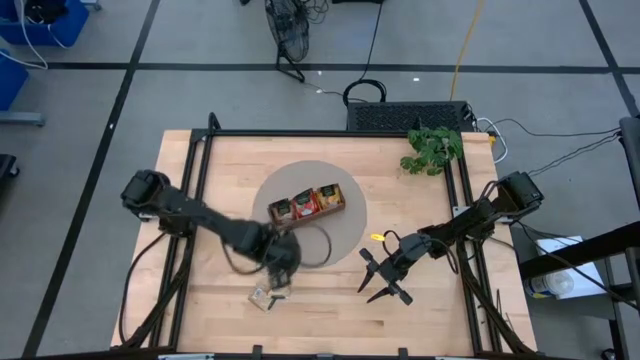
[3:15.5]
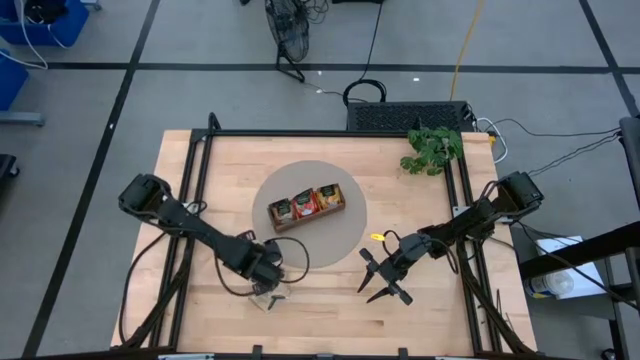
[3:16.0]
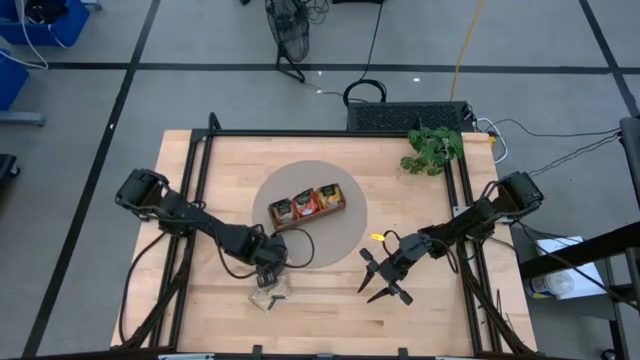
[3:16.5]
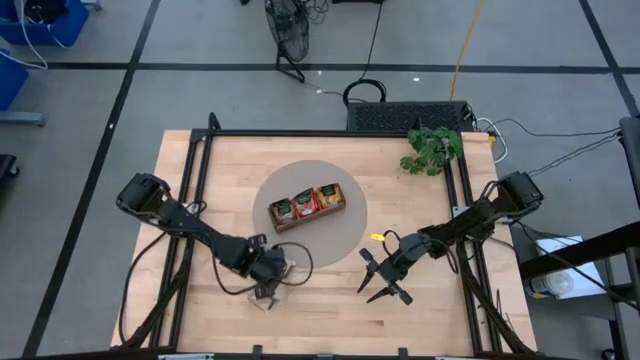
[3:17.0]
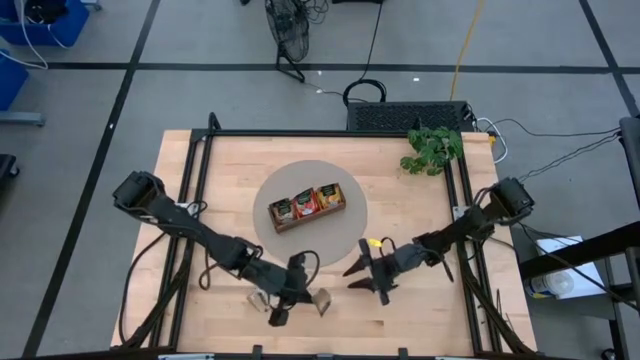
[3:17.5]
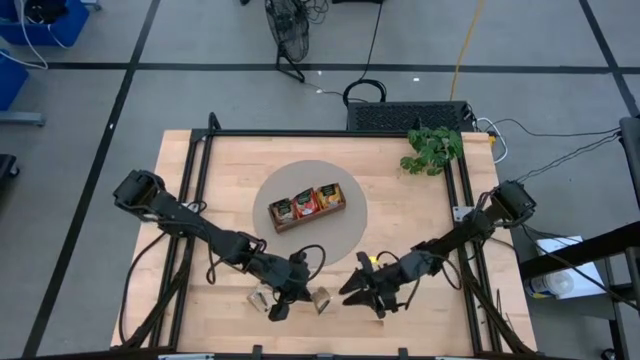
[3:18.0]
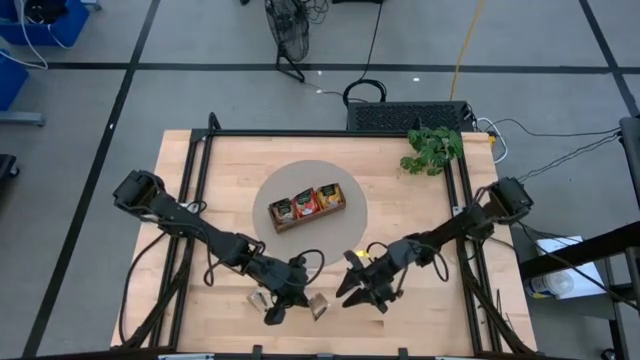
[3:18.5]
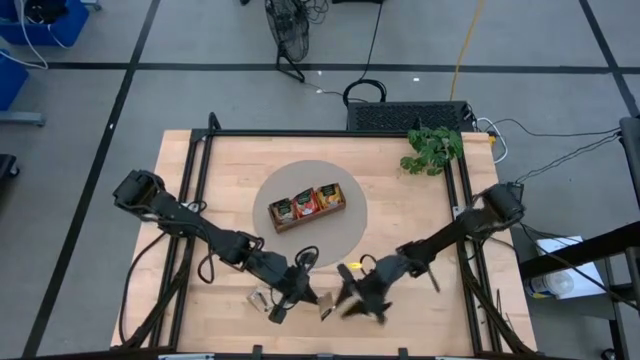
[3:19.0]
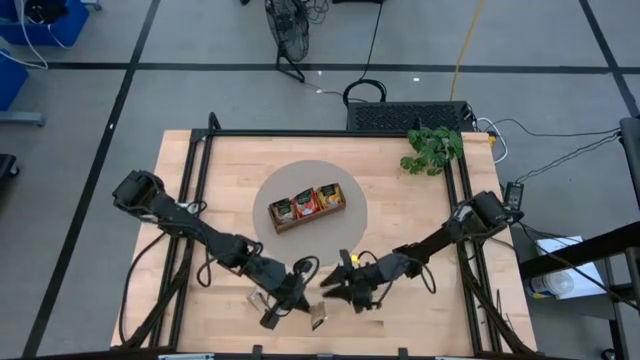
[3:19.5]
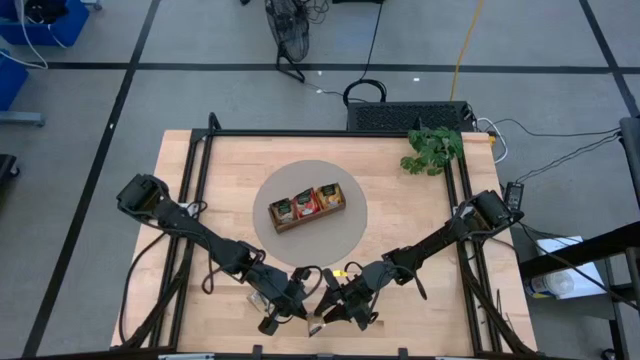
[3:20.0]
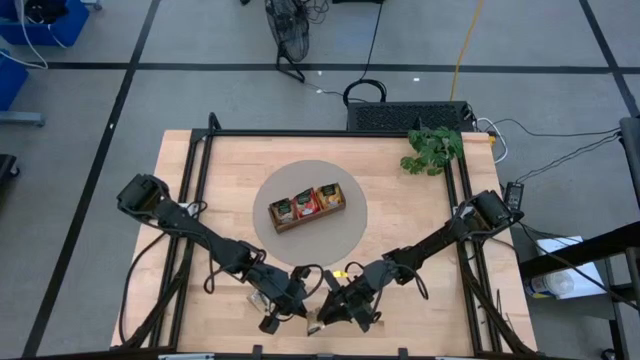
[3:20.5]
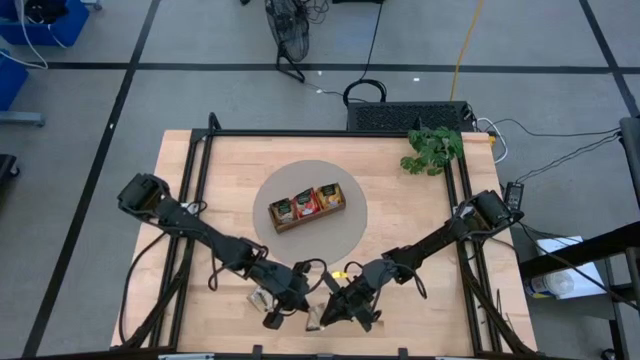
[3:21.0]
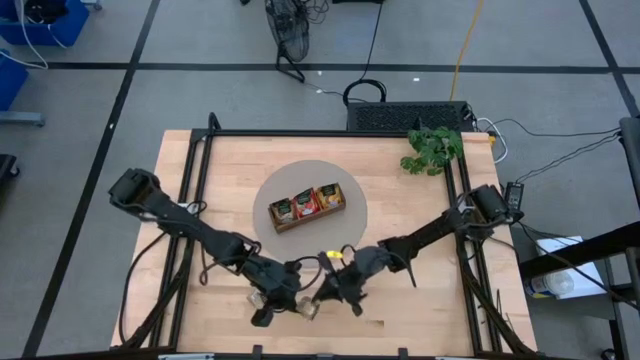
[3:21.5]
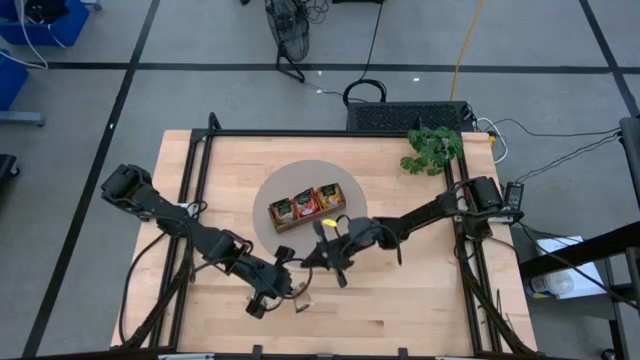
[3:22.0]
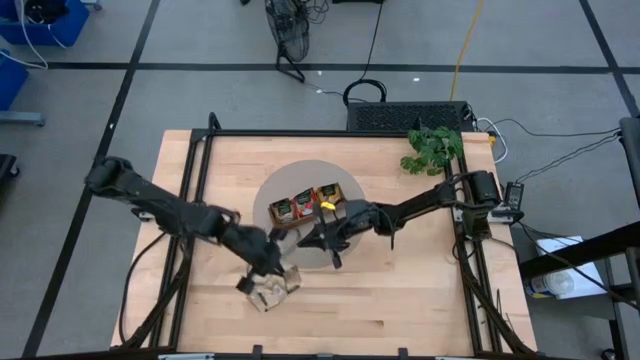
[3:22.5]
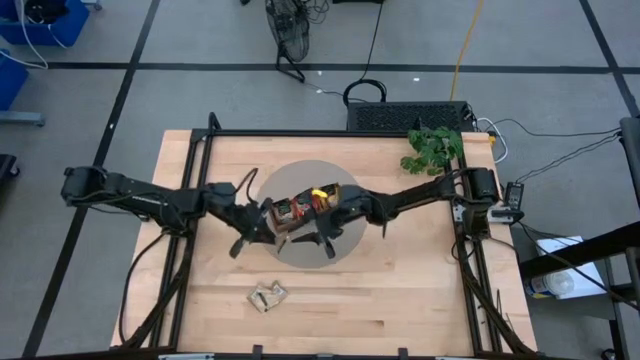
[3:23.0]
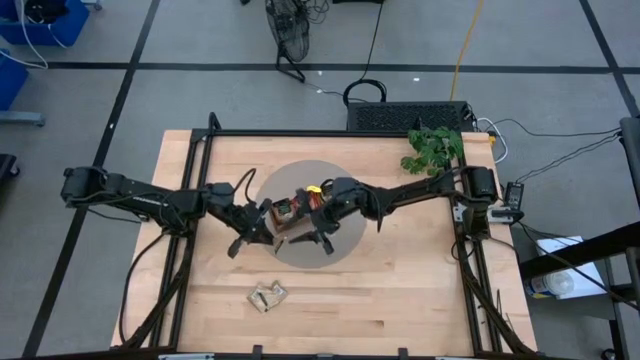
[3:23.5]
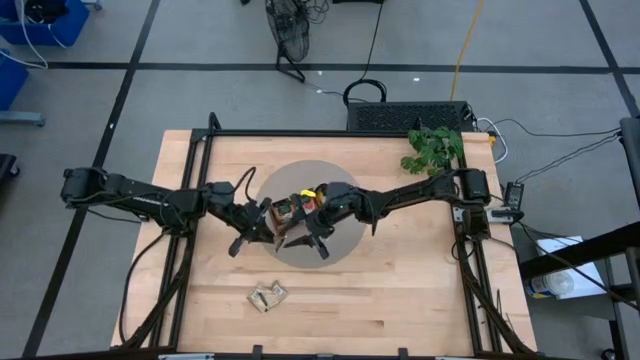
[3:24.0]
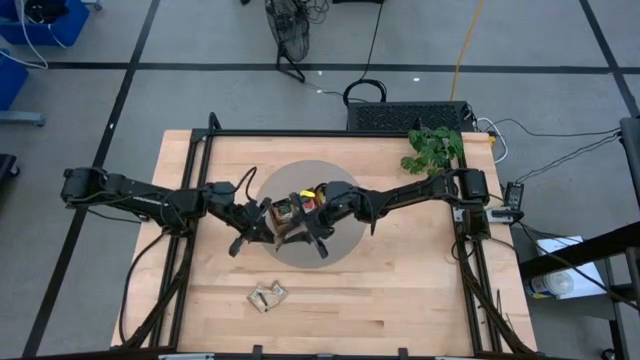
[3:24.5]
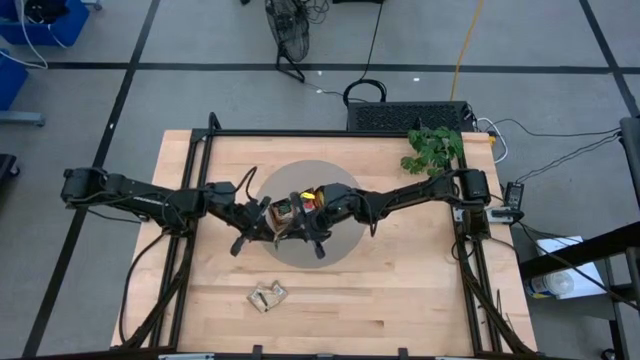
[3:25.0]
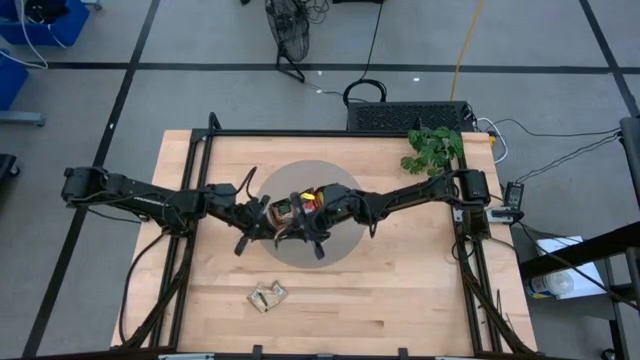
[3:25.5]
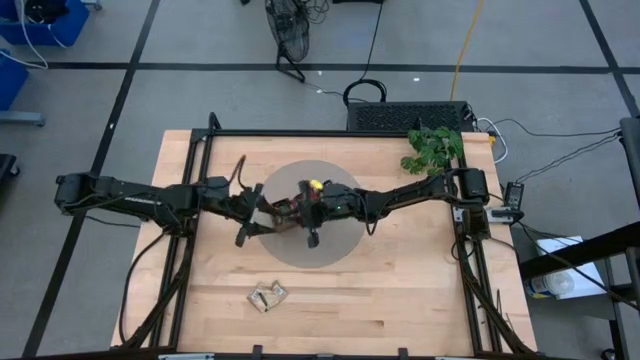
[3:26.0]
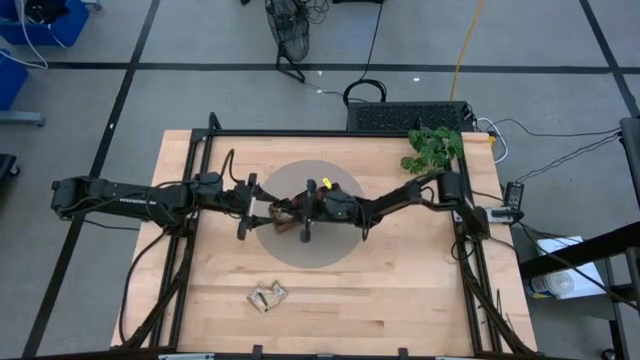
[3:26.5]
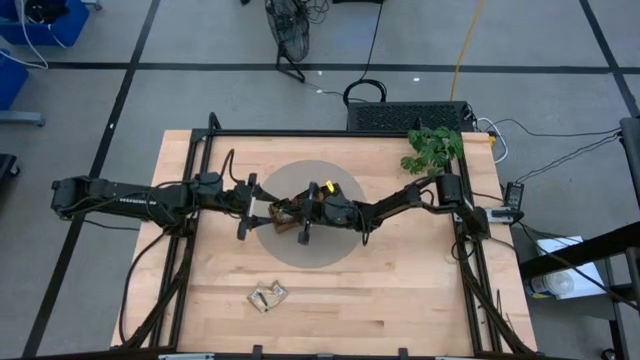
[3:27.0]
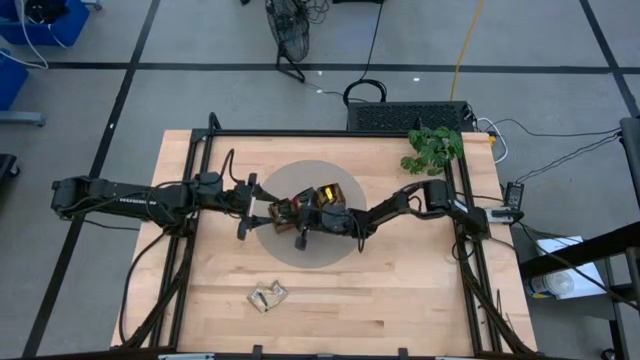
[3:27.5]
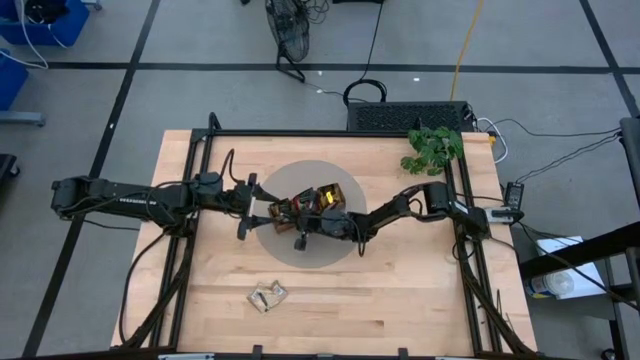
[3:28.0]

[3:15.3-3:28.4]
Task: Pick & Place Tea
Put the brown tea bag into the wooden organizer

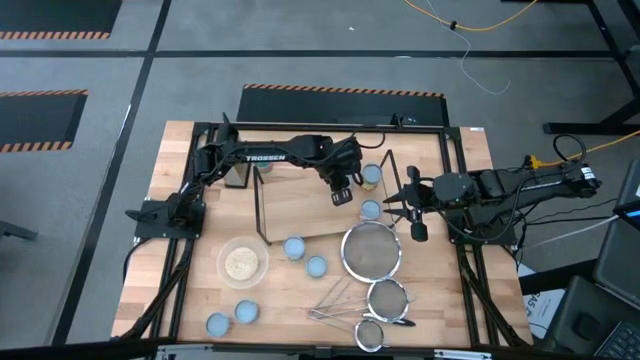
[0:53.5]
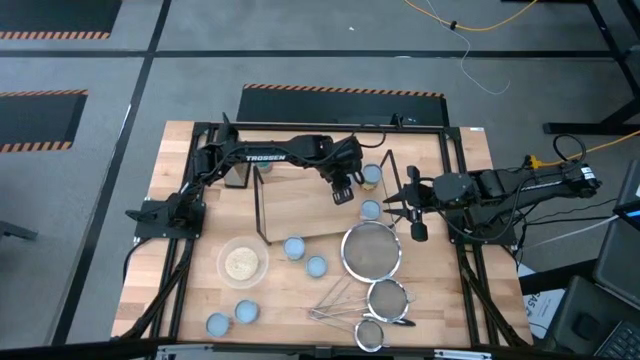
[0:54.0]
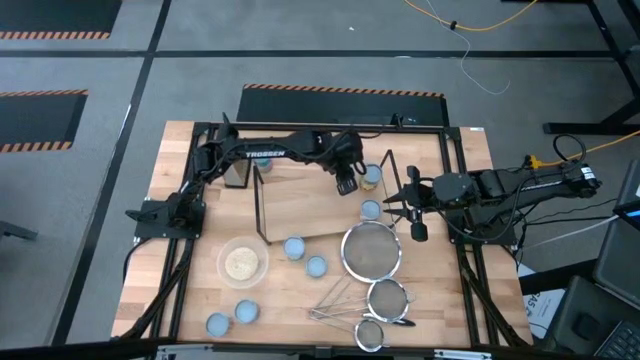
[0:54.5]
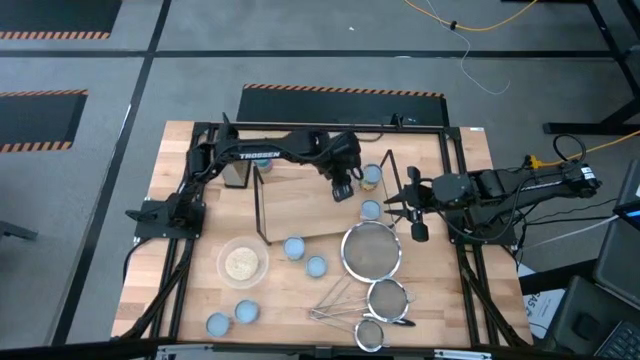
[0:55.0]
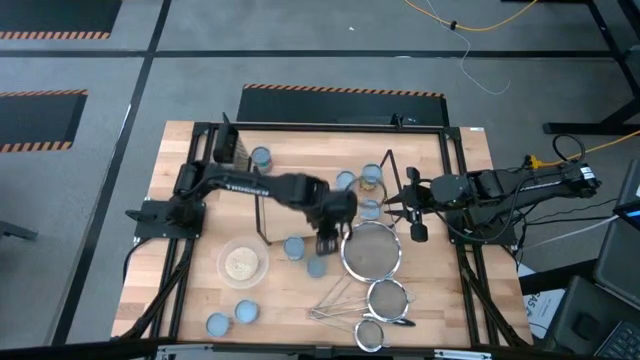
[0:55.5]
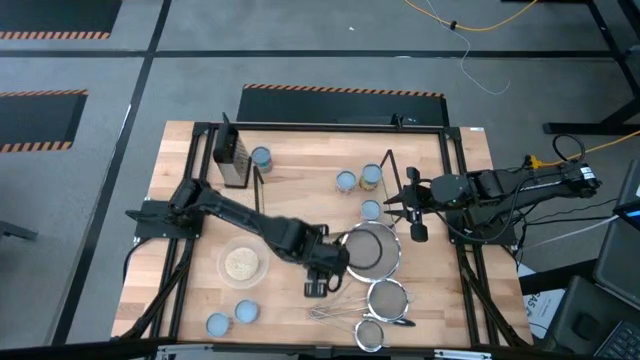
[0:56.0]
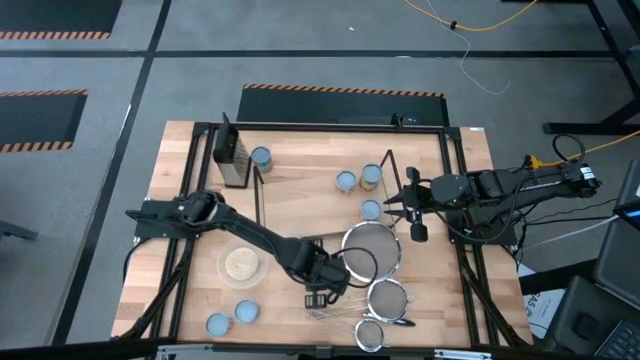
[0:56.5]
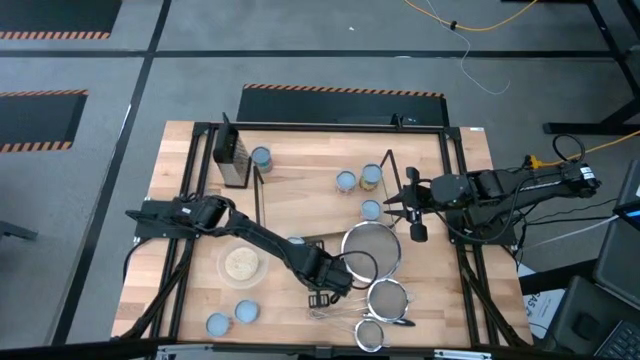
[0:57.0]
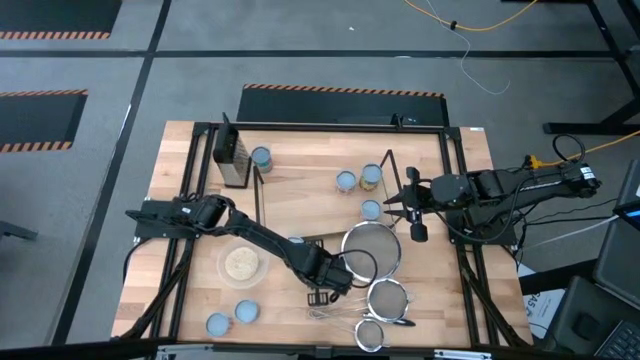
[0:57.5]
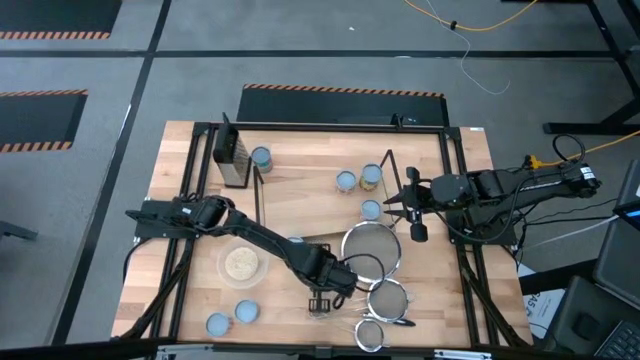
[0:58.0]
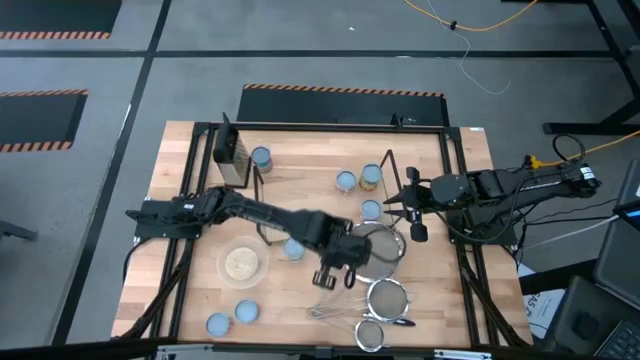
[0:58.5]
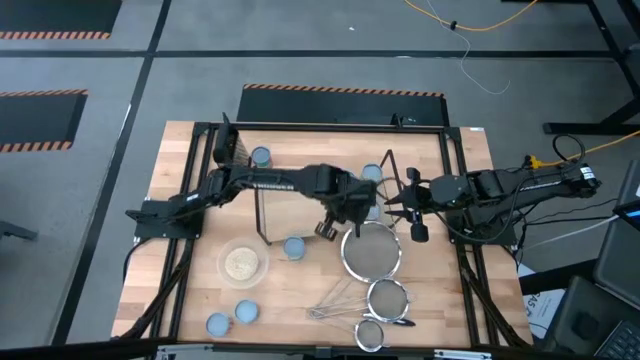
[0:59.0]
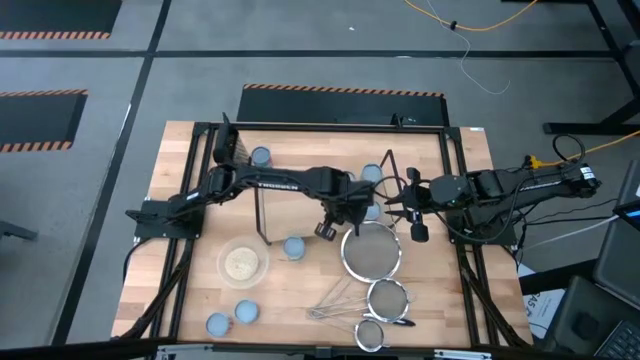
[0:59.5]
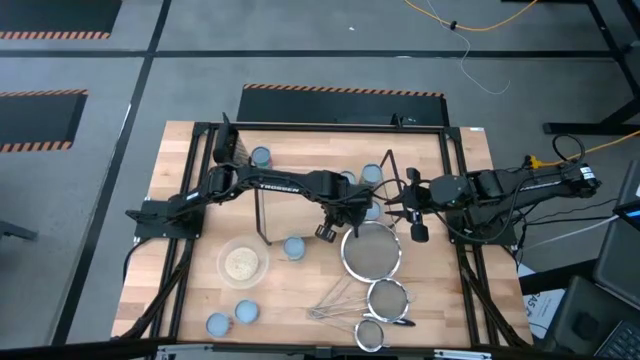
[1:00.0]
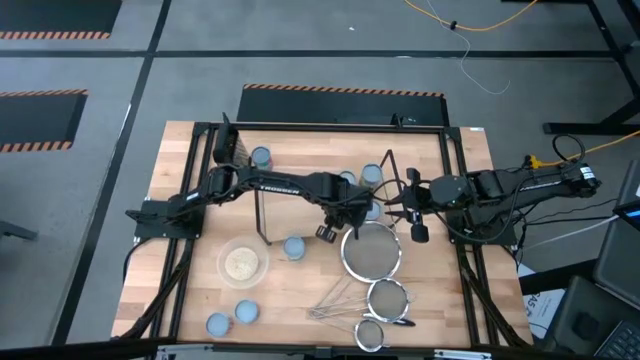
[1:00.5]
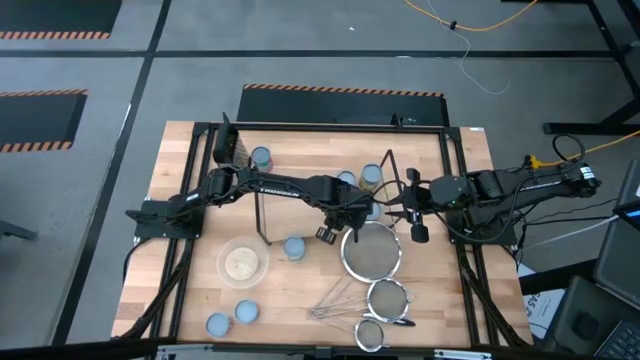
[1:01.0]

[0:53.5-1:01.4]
Task: Pick and place cans onto a shelf
Put the small green can on the shelf
